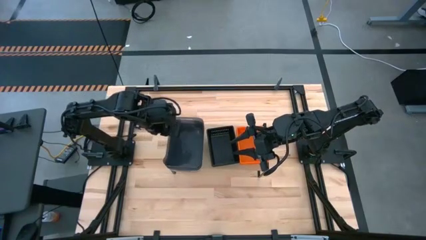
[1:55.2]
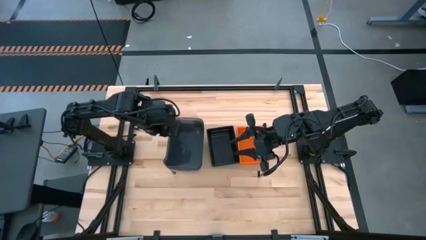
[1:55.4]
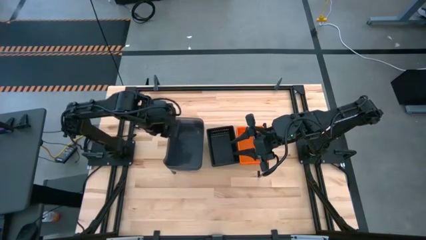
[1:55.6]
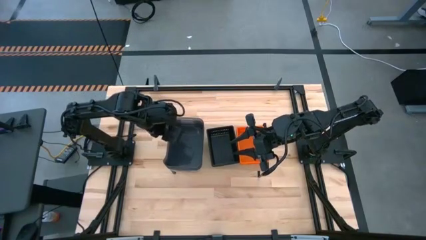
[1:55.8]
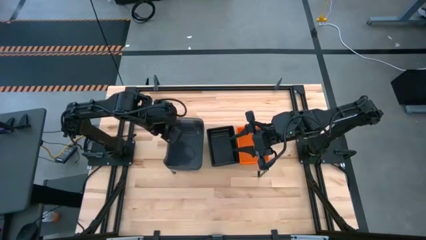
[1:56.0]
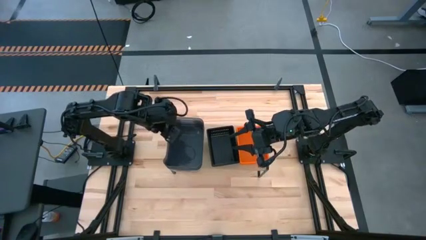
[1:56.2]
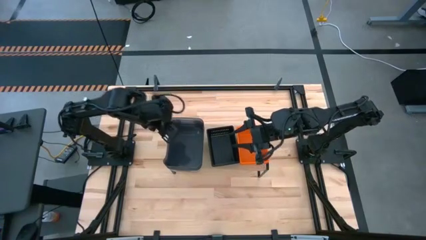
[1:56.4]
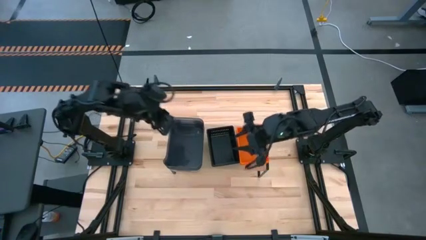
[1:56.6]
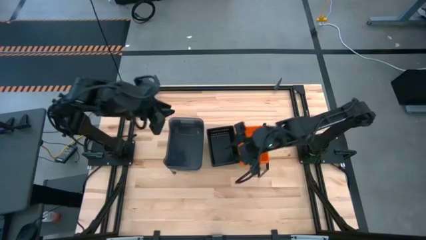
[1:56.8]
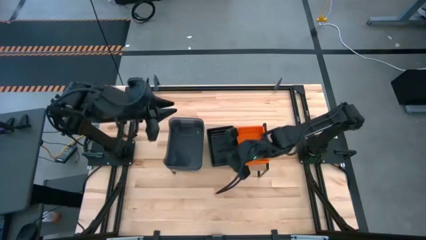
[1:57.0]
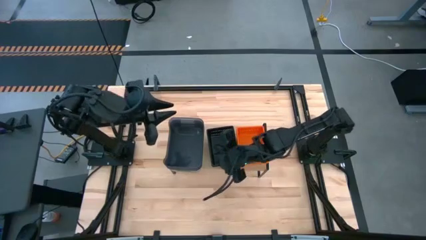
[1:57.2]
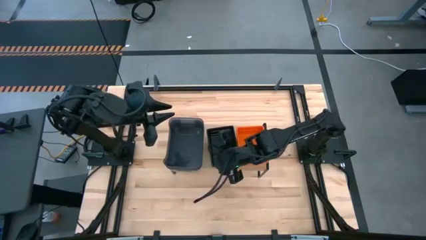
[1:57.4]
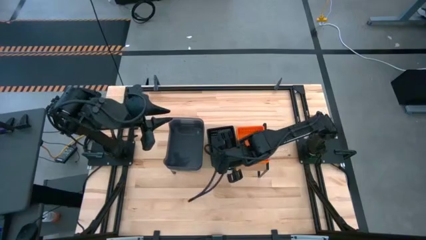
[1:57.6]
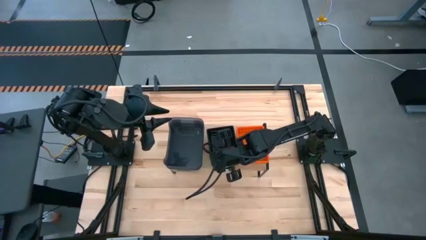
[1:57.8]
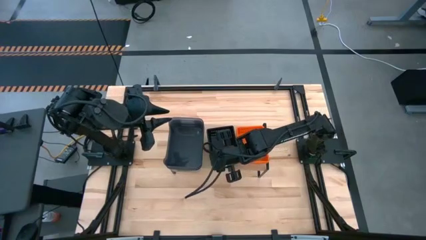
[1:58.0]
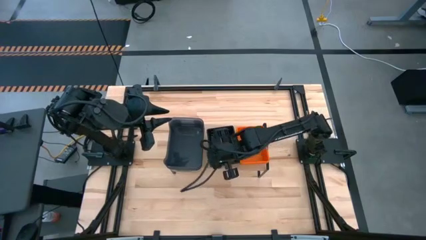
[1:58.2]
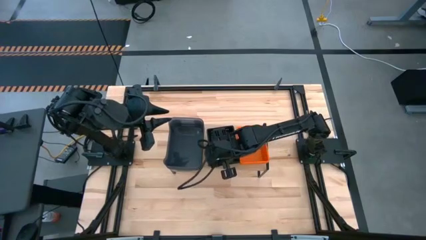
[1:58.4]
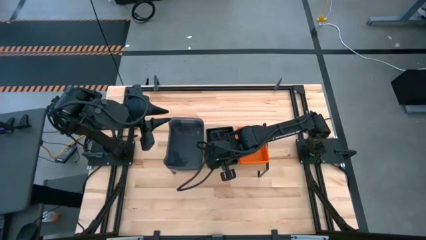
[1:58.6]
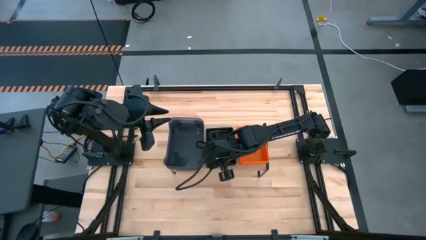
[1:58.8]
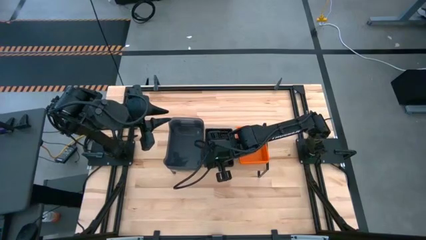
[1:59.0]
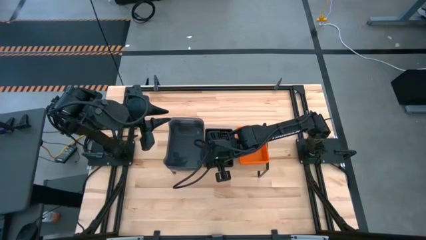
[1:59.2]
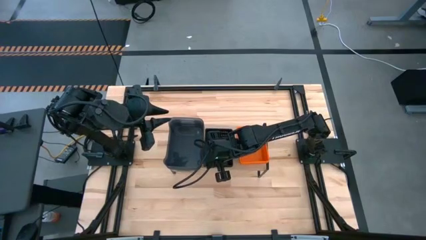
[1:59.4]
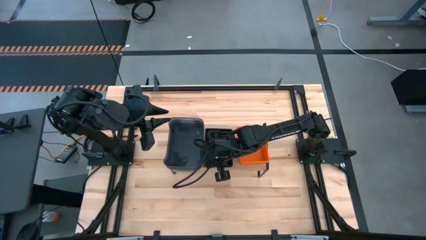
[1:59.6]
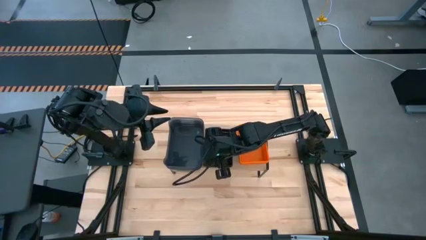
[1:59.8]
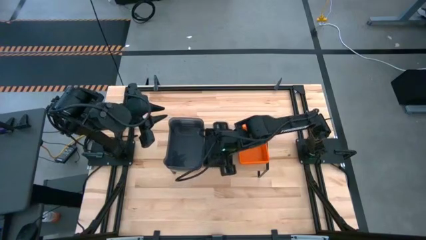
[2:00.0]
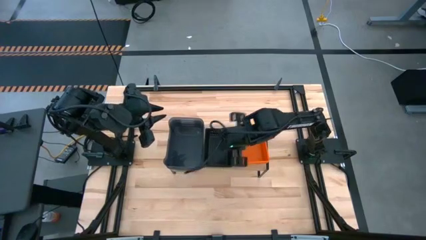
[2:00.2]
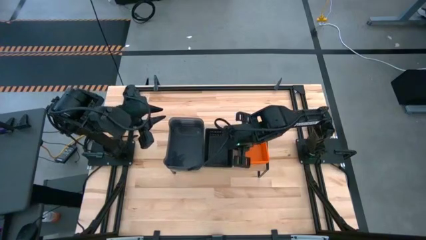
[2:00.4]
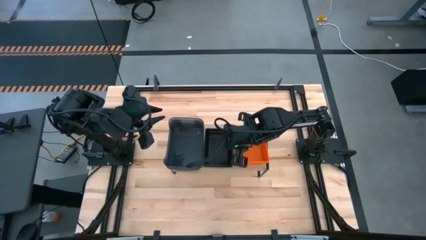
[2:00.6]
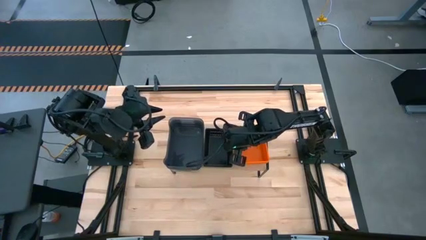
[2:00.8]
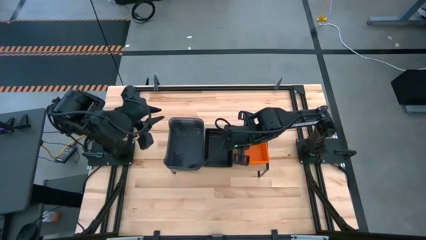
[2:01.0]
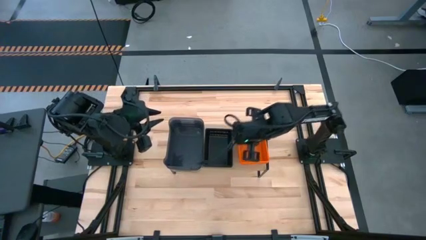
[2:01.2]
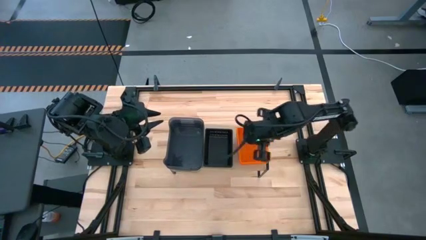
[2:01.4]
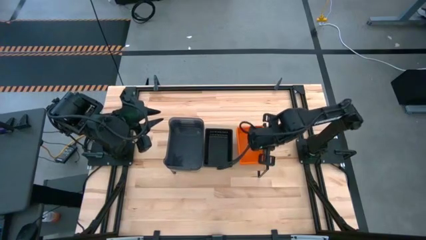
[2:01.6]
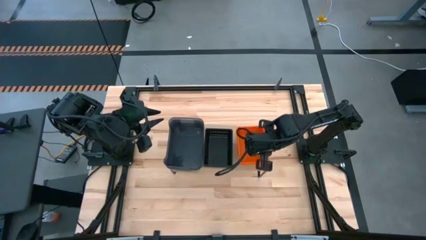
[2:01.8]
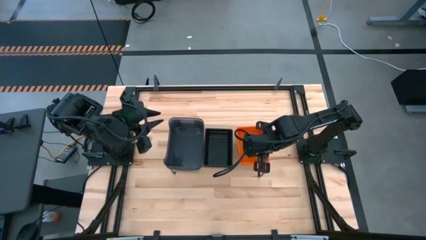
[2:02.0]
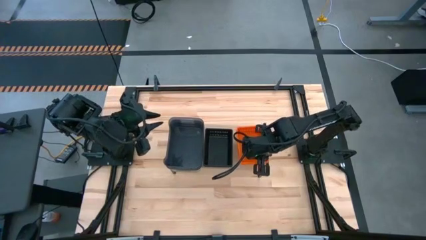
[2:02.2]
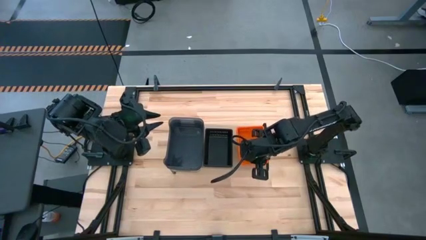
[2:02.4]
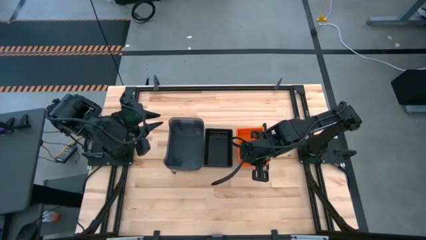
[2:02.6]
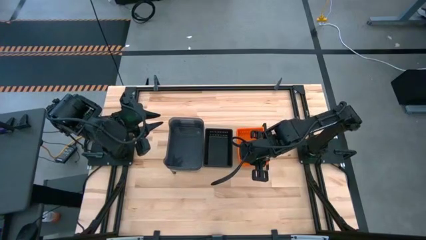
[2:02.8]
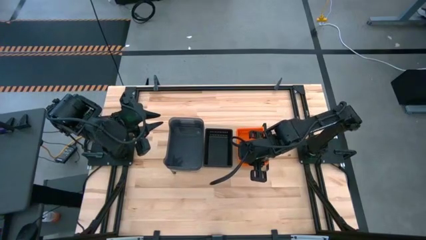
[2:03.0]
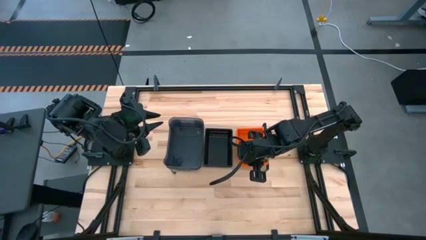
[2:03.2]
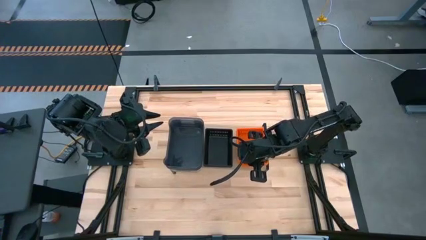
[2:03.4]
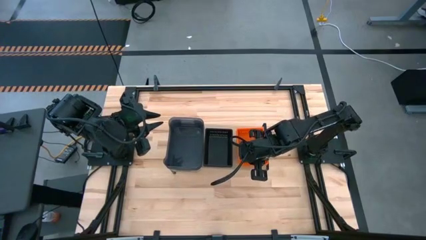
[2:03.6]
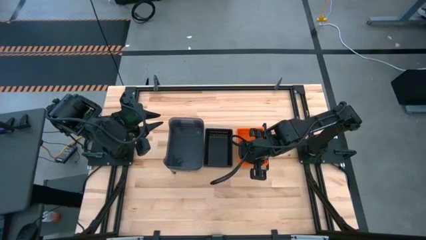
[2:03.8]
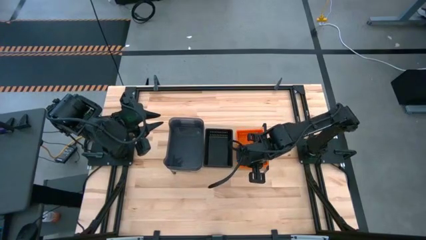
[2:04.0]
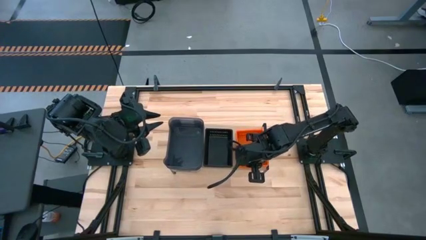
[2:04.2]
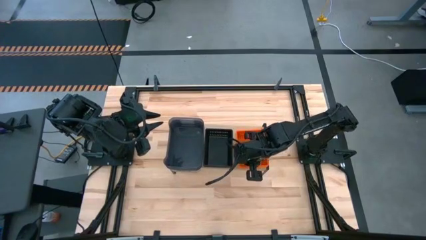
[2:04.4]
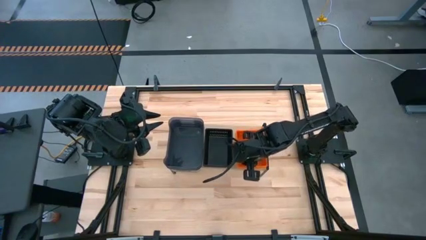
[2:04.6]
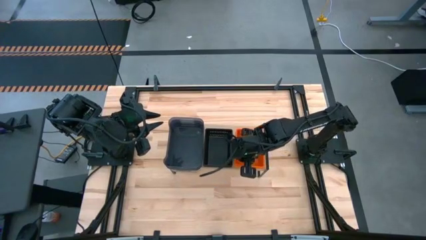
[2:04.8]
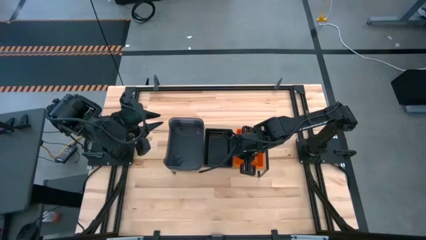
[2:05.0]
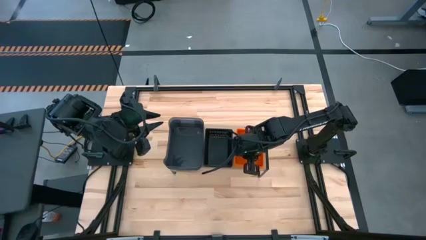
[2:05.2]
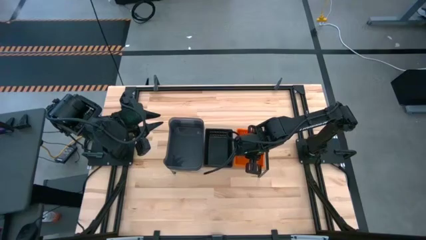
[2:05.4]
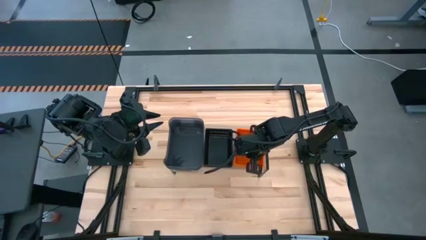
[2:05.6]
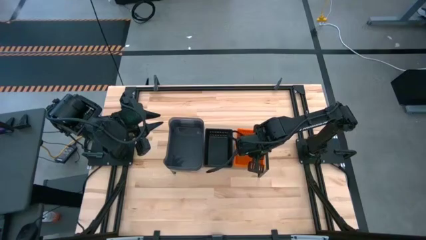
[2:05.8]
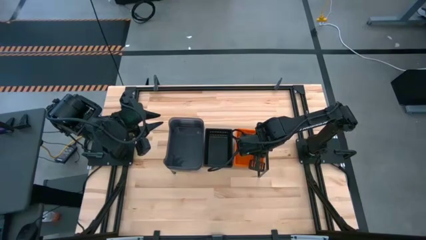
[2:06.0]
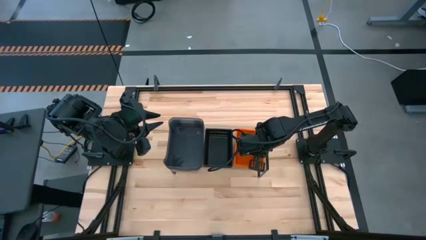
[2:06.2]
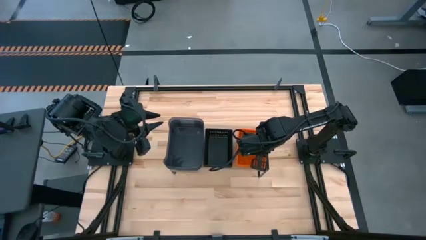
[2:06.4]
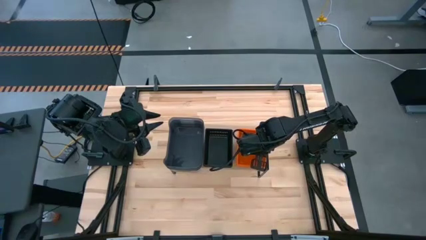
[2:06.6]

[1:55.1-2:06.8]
Task: Stack baskets on shelf by color
Adjust the bins on the shelf

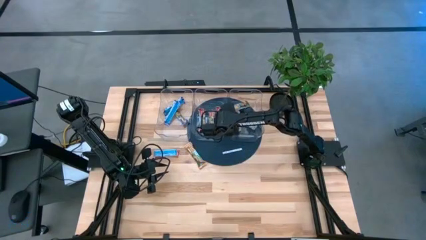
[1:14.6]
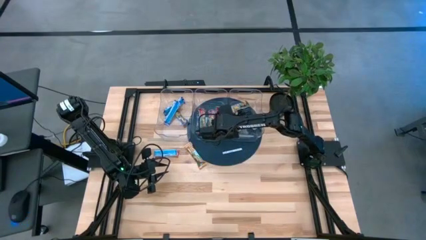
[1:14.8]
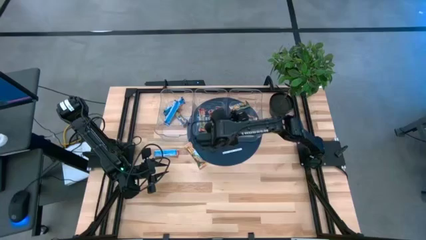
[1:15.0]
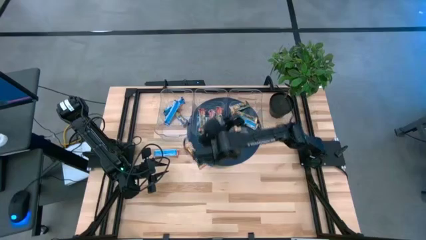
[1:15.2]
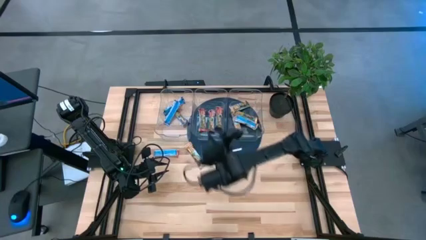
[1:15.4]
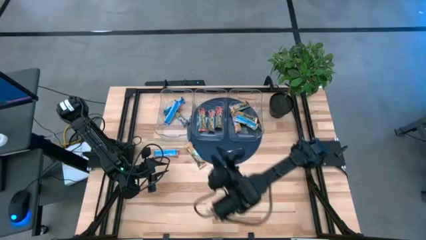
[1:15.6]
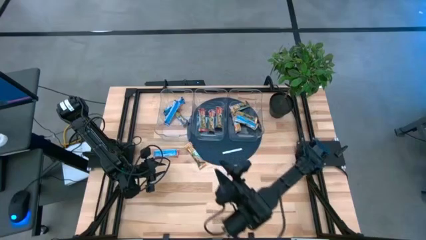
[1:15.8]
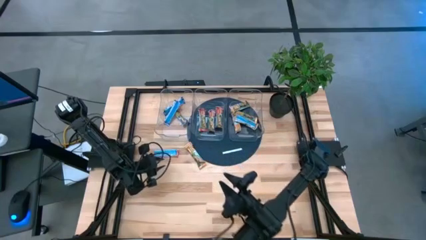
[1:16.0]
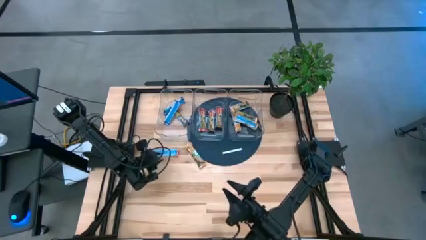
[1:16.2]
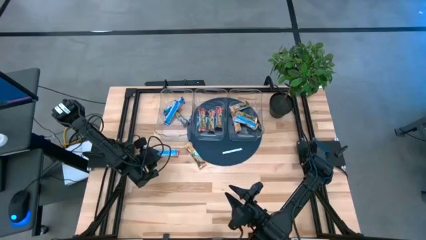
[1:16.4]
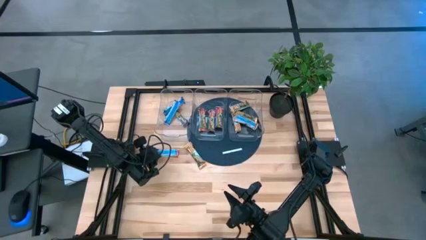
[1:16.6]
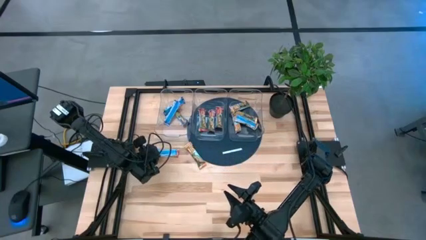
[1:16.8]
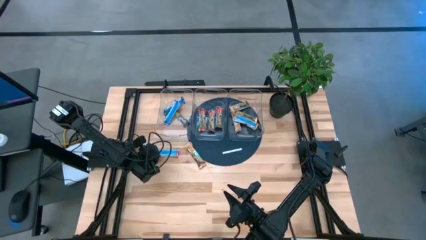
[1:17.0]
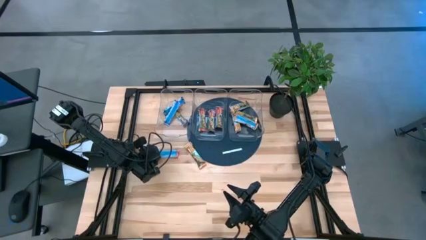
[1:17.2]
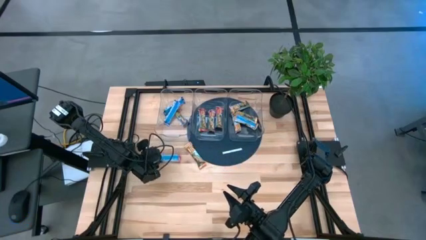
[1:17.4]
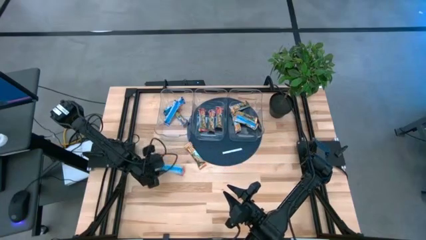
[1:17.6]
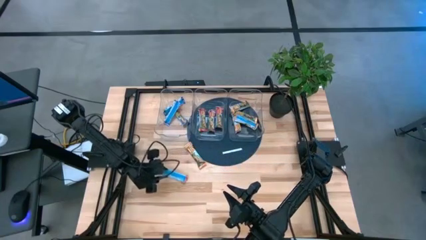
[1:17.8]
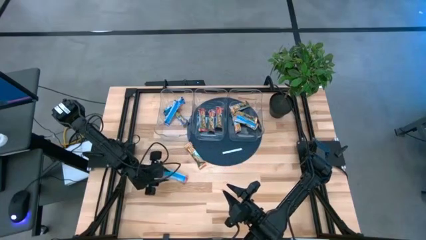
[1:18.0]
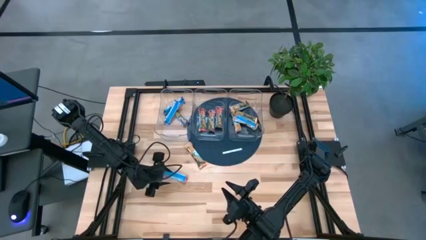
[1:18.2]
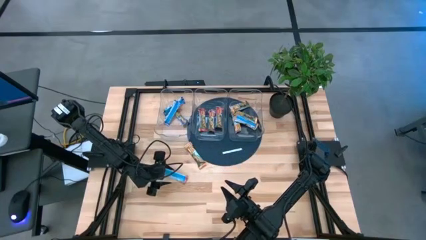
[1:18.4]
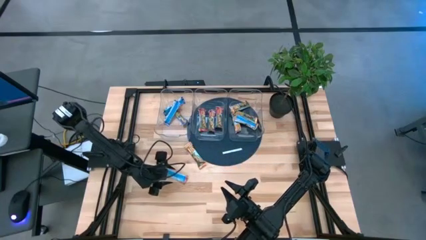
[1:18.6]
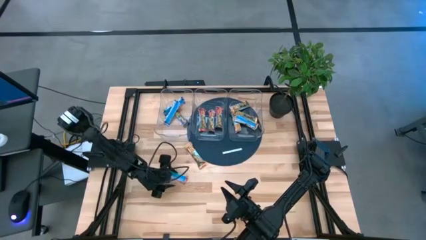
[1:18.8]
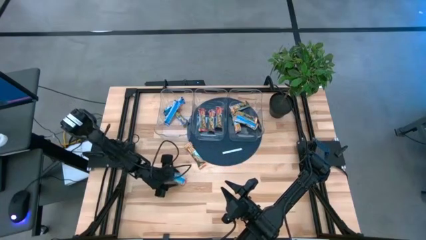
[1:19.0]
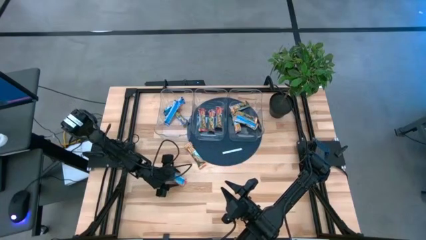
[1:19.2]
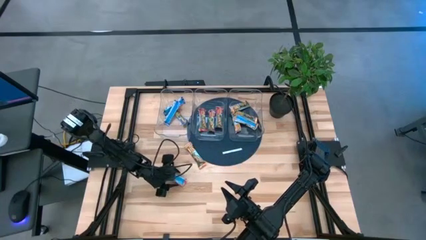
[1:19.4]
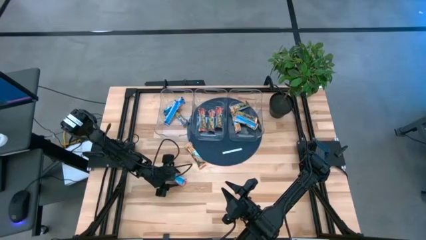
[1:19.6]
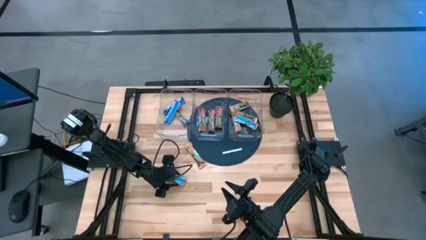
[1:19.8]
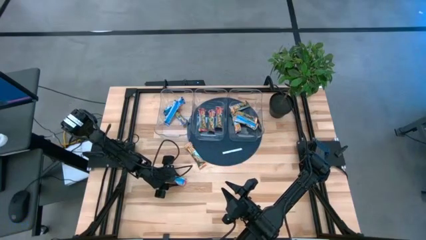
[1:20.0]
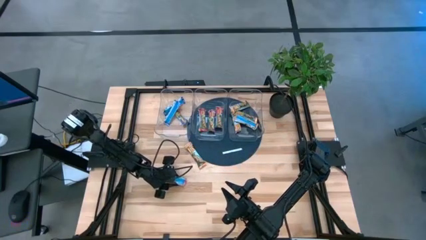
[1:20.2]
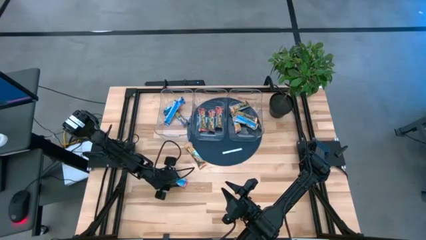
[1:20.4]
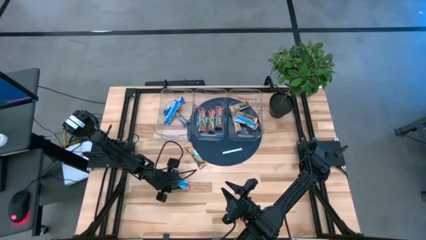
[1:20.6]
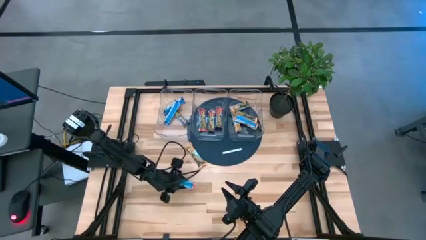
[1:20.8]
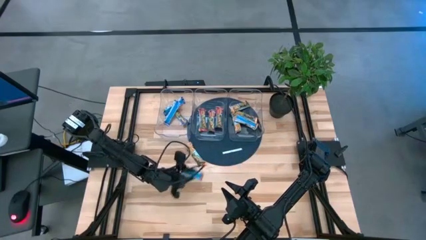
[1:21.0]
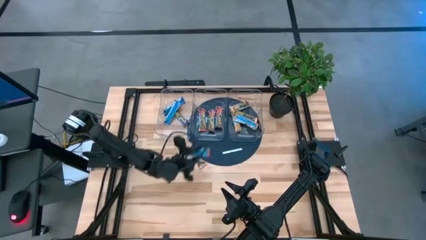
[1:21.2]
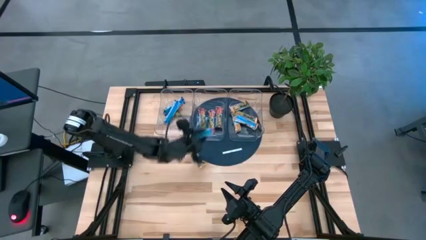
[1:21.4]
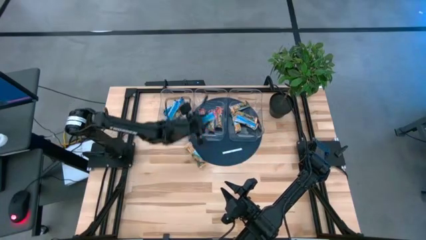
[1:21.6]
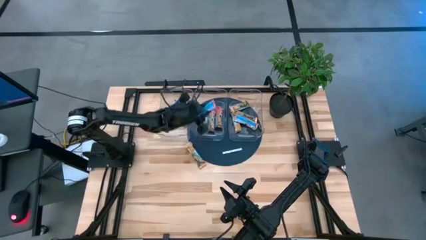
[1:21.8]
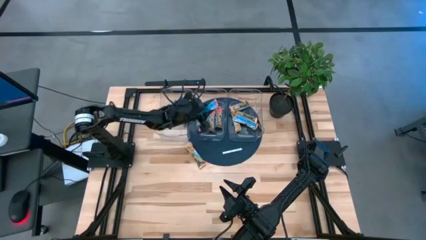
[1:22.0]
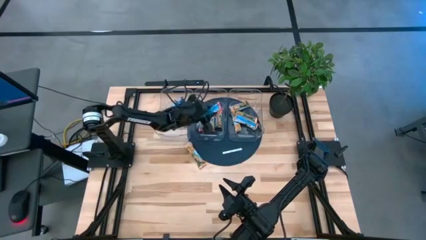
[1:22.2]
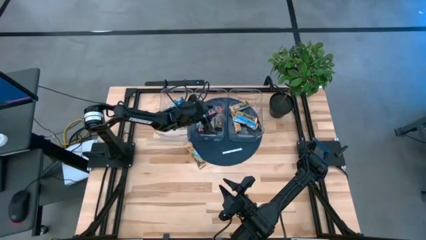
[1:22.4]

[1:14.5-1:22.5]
Task: Pick and place Granola Bars by type
Put the red granola bar into the middle transparent bin
